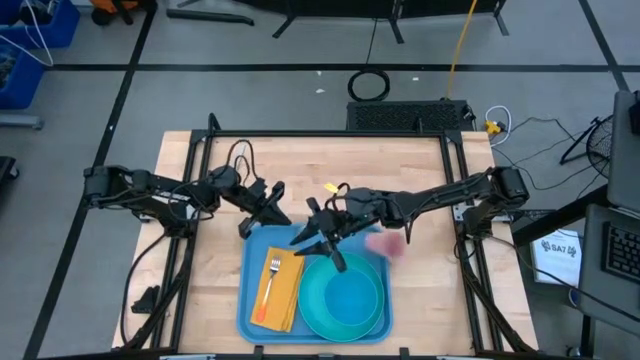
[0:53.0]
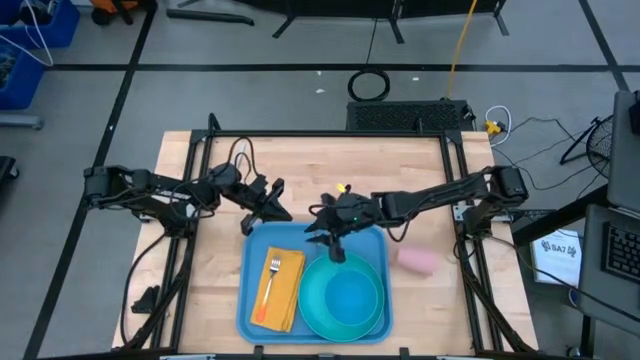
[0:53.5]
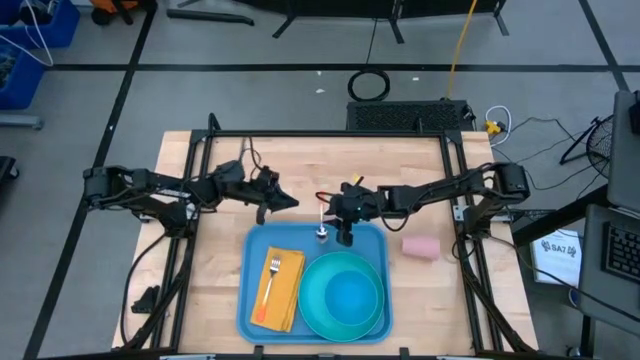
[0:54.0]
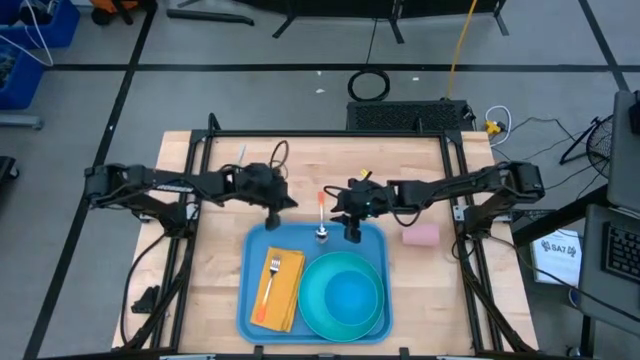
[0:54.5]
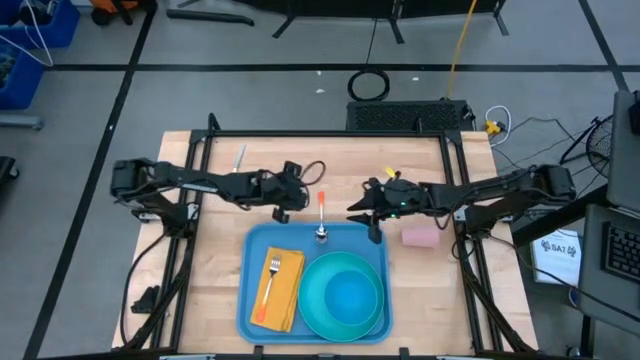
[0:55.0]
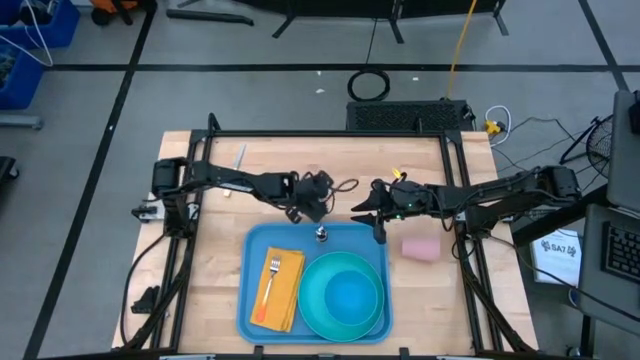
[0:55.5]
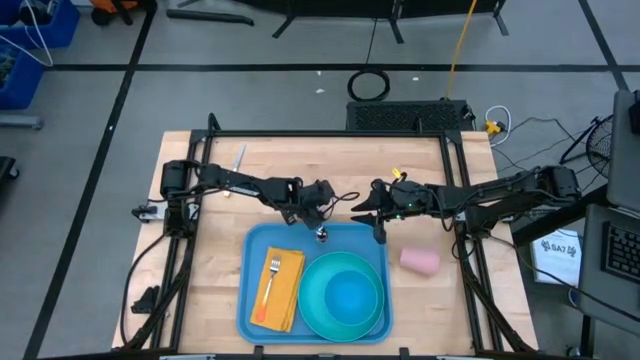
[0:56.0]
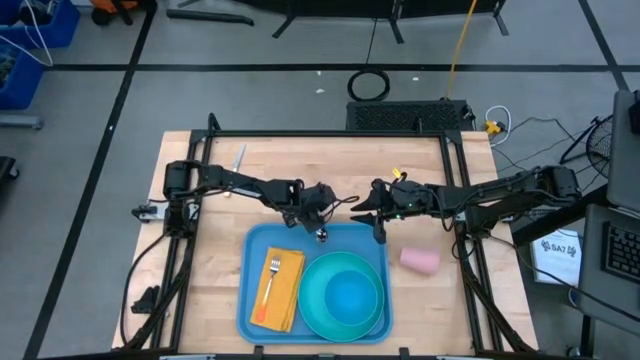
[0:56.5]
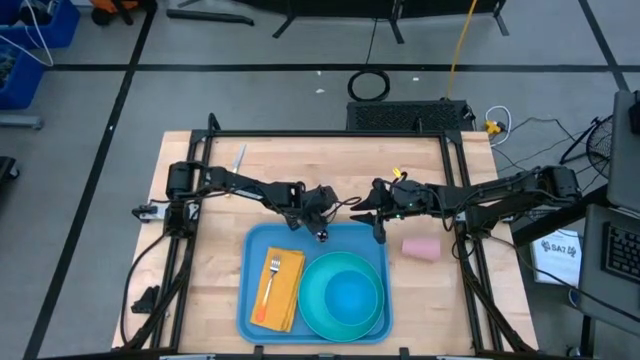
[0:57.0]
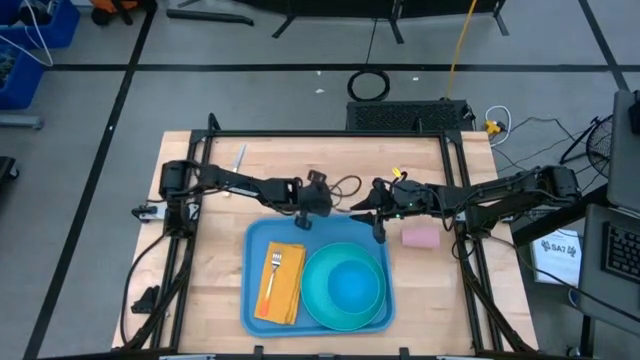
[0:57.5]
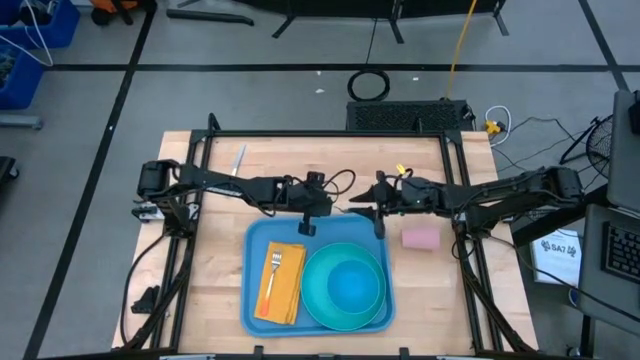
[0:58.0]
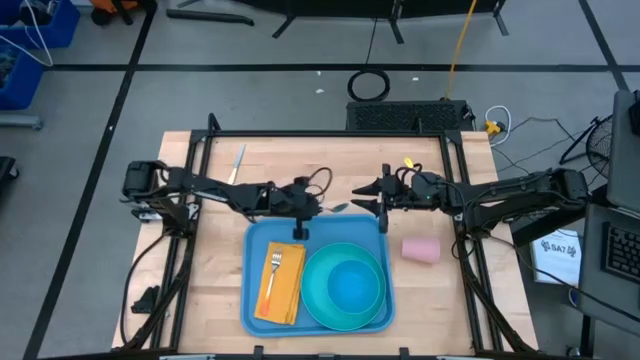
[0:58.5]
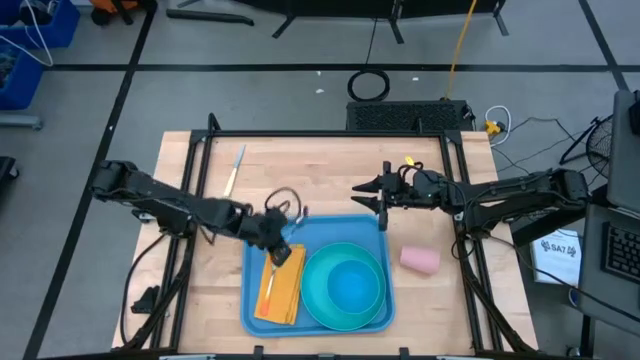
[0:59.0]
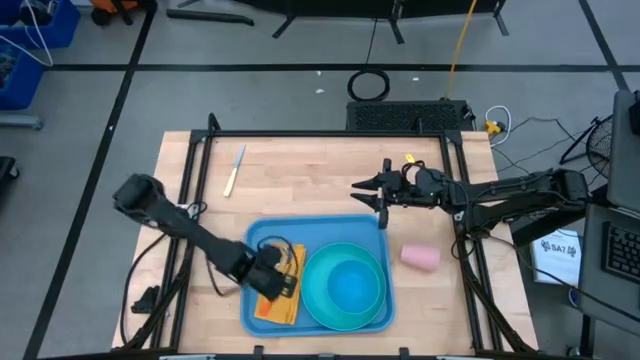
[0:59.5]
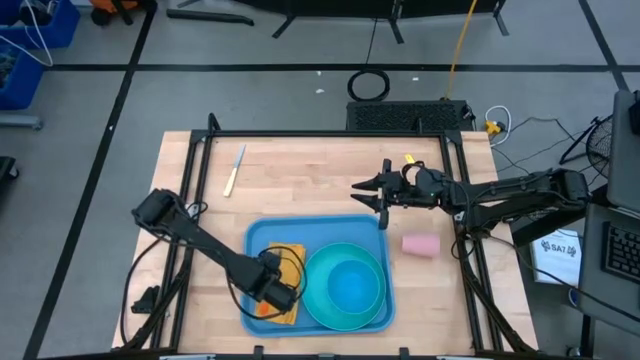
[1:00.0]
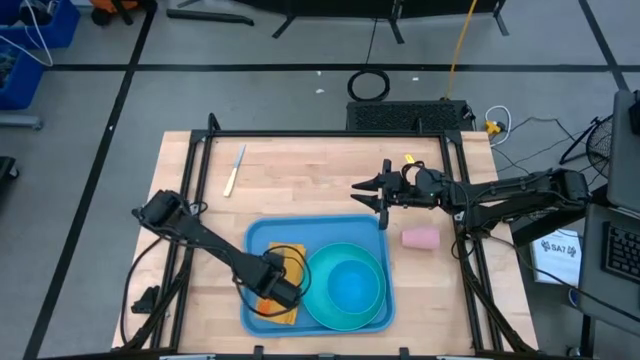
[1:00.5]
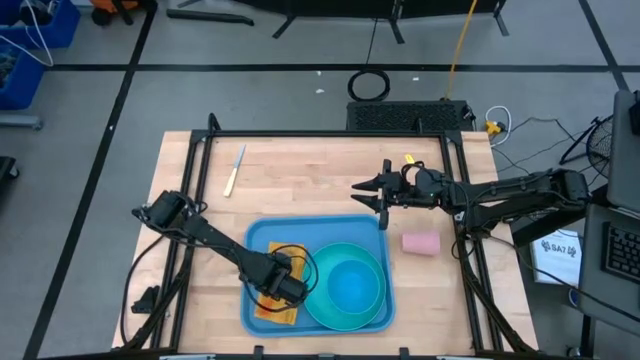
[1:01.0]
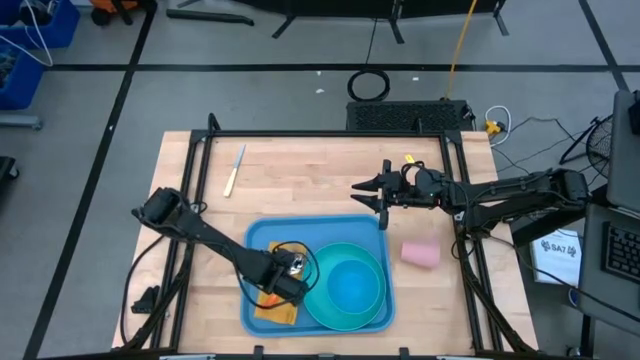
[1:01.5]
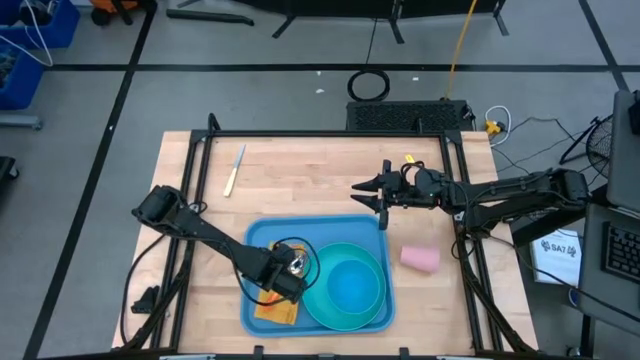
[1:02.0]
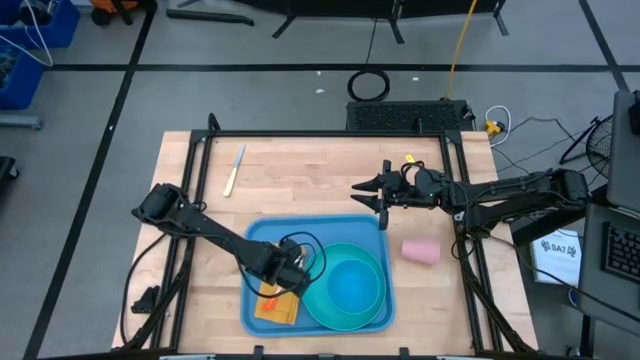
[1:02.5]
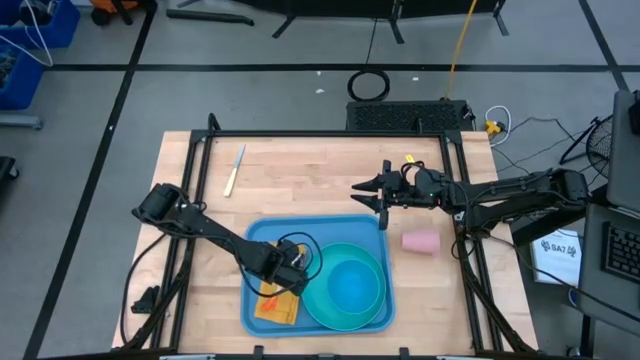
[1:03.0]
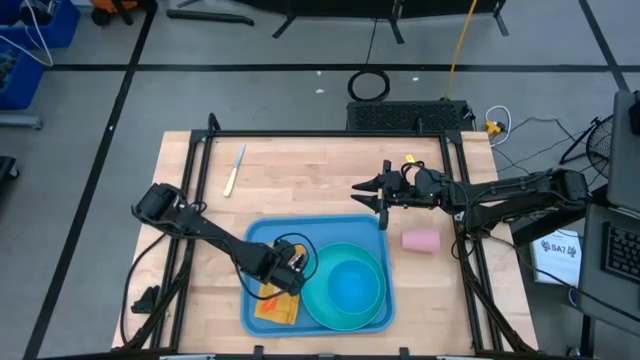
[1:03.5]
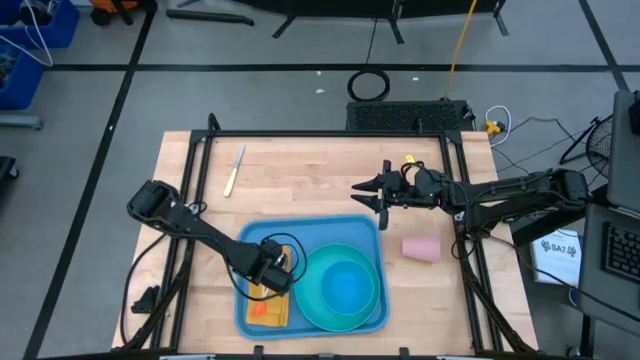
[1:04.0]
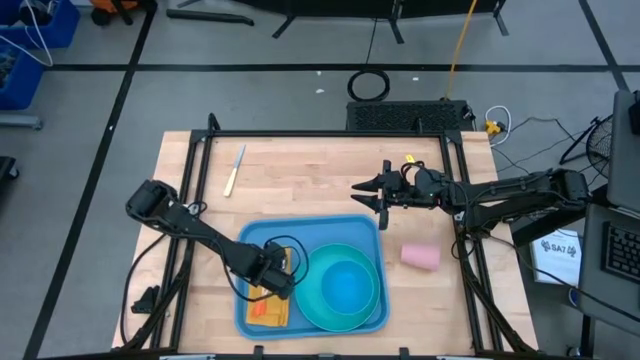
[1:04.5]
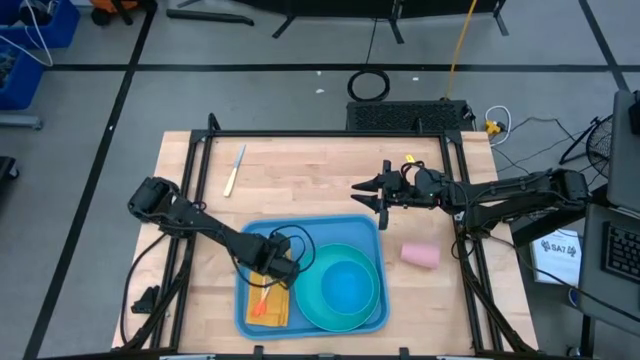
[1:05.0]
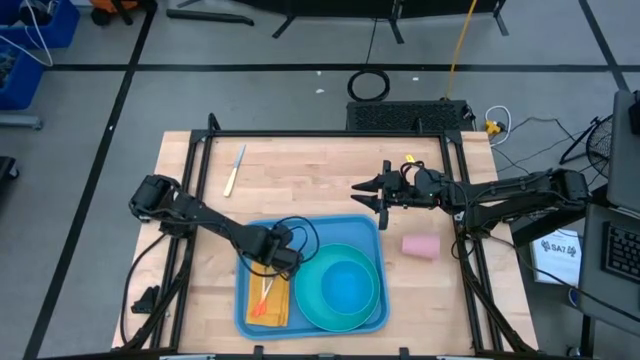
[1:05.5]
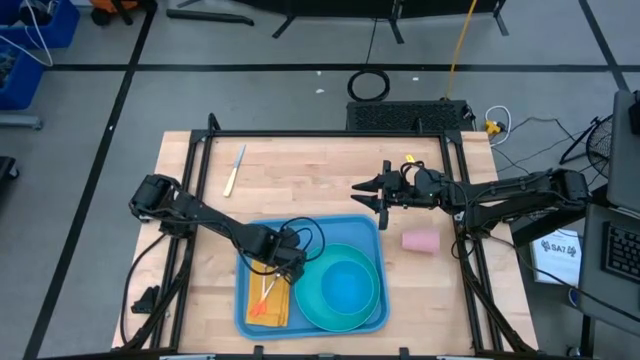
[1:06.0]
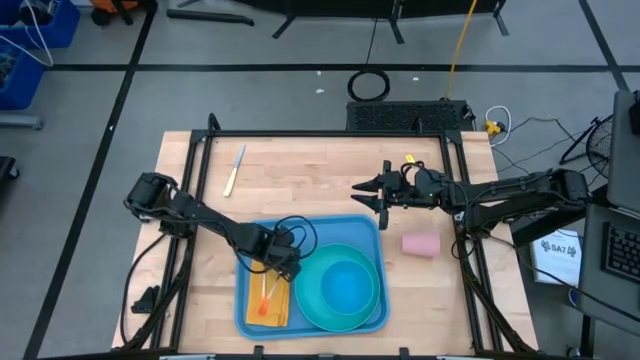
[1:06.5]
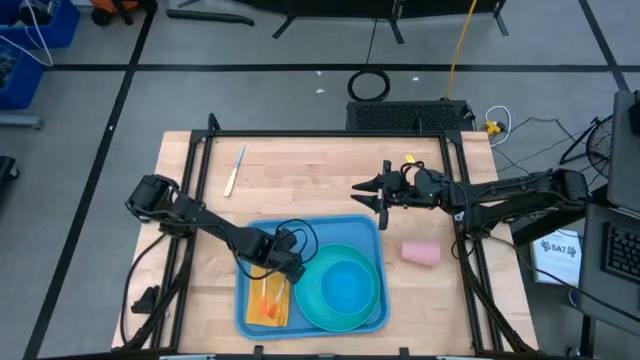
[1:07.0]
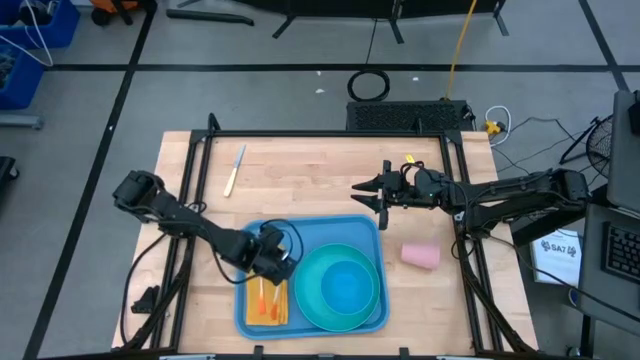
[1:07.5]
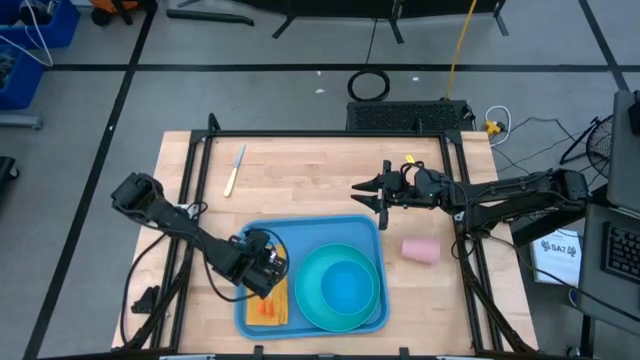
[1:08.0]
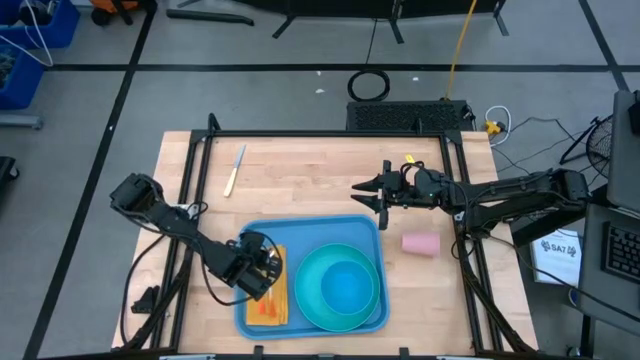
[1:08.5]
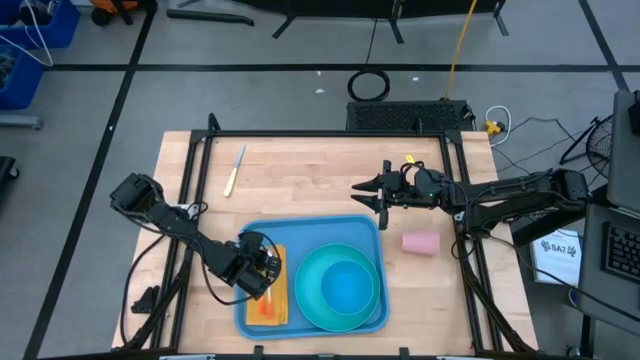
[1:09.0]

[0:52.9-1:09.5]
Task: Set up tray
Put the orange spoon on top of the yellow napkin to the right of the orange fork

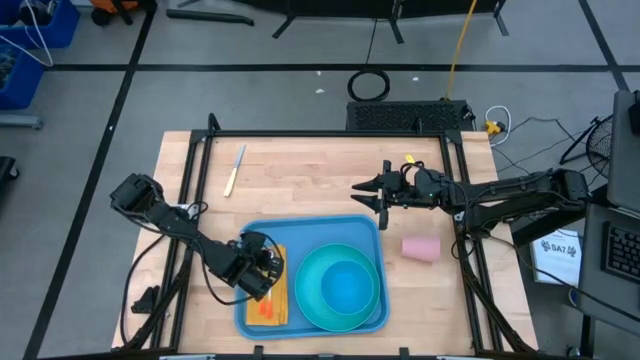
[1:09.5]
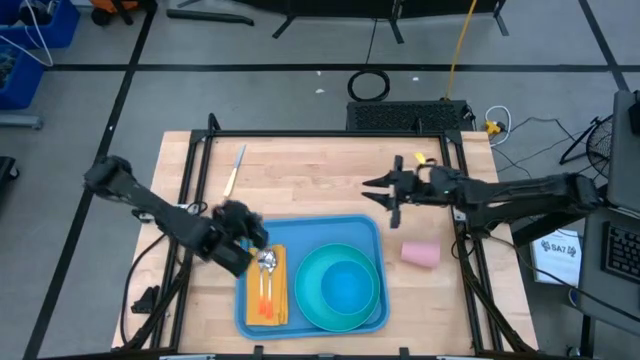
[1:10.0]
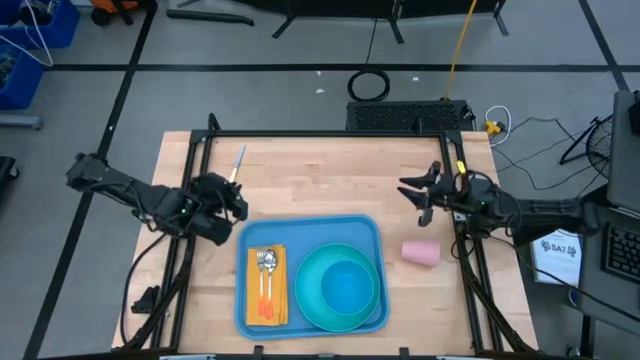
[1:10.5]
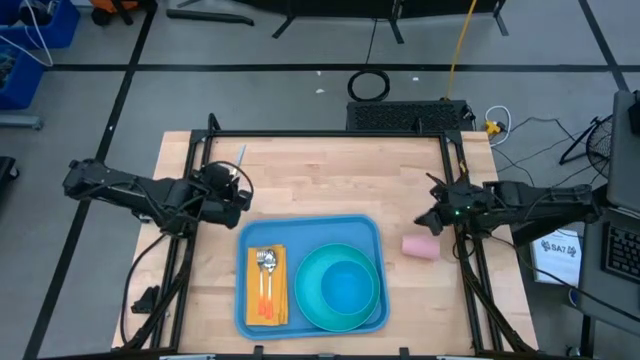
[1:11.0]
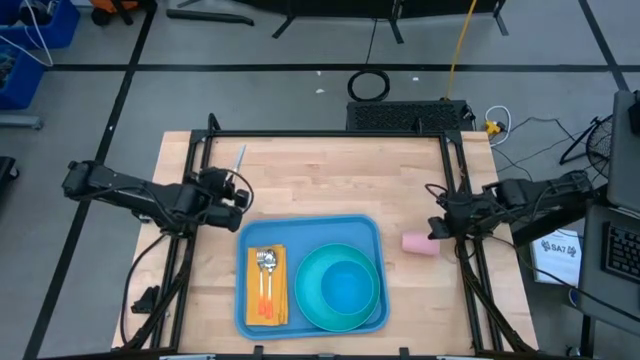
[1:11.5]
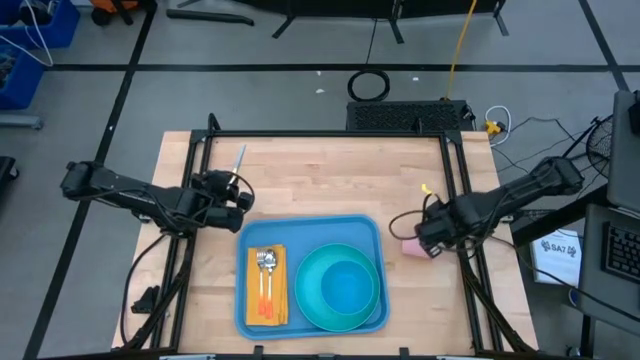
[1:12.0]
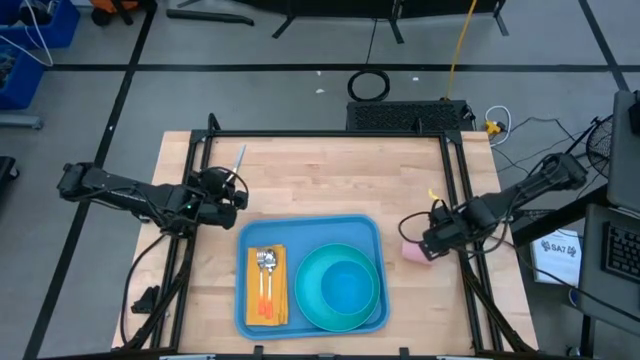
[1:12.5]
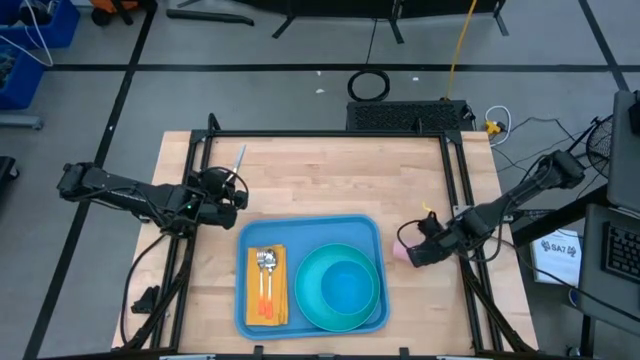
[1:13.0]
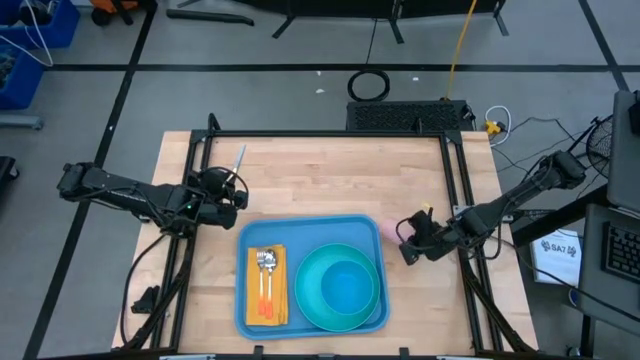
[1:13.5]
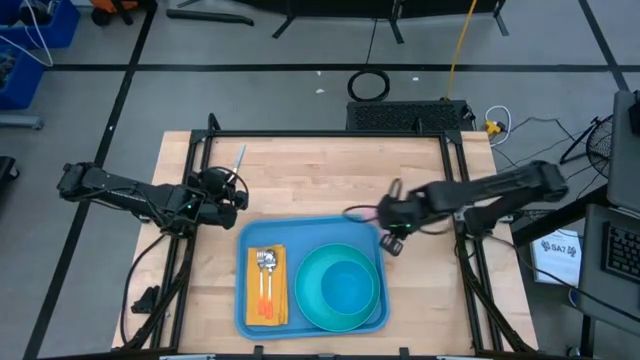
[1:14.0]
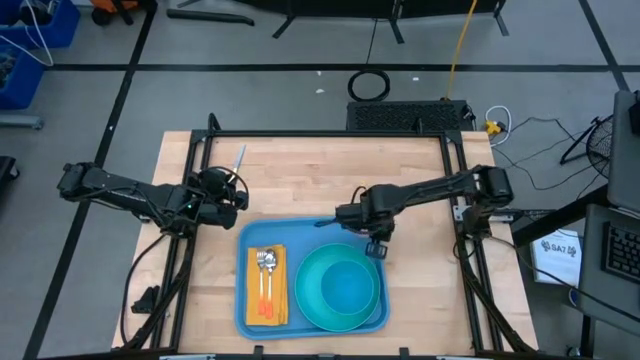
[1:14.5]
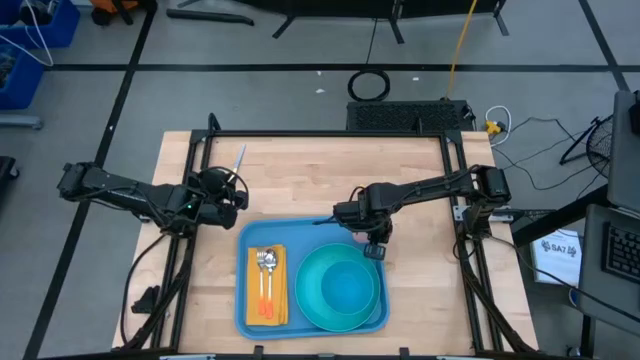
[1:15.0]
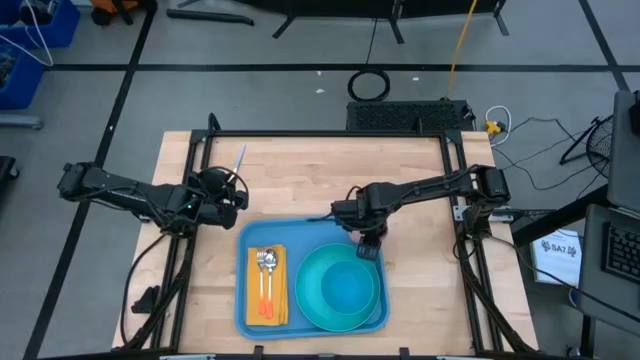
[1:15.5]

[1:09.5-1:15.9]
Put the pink cup on the blue serving tray to the top of the light blue plate
